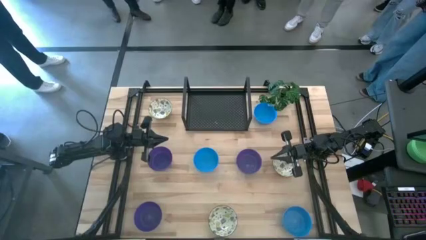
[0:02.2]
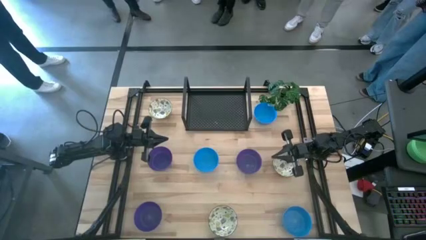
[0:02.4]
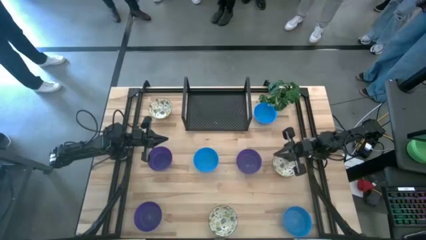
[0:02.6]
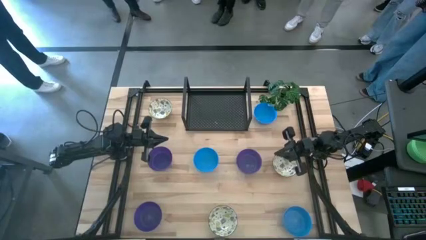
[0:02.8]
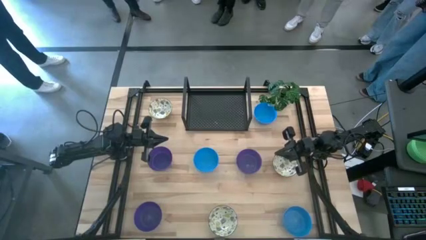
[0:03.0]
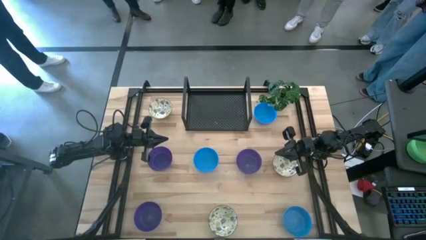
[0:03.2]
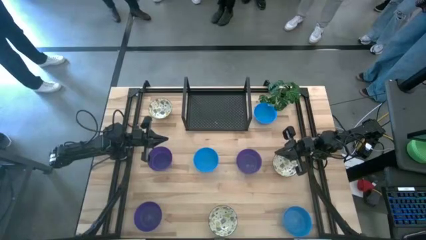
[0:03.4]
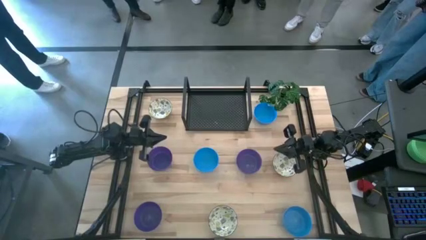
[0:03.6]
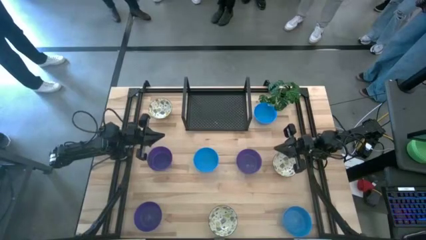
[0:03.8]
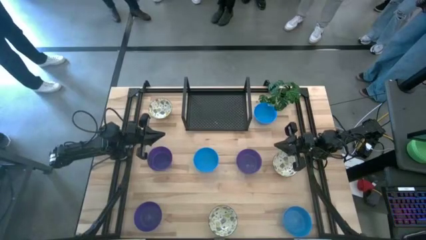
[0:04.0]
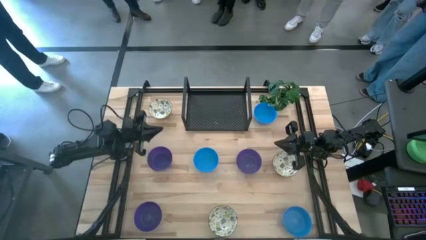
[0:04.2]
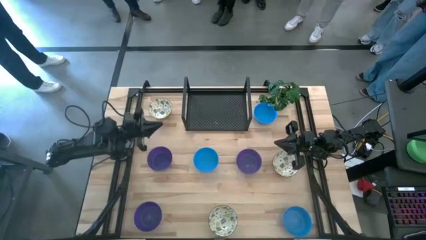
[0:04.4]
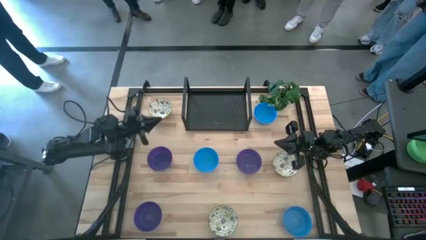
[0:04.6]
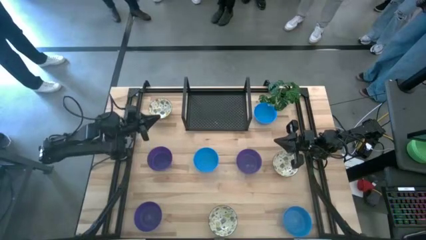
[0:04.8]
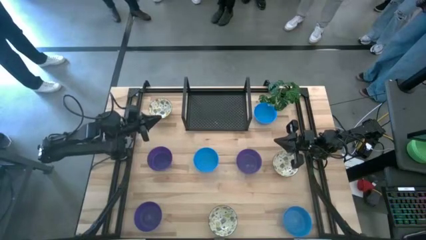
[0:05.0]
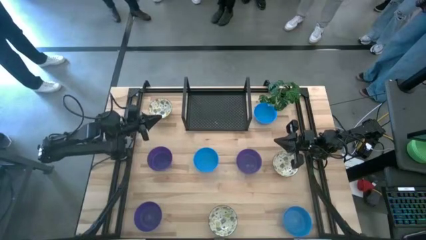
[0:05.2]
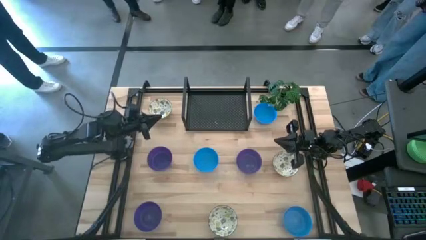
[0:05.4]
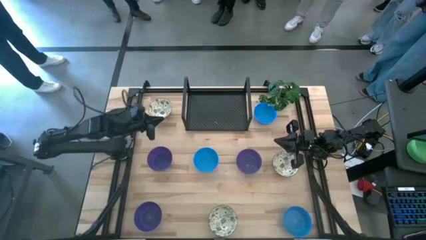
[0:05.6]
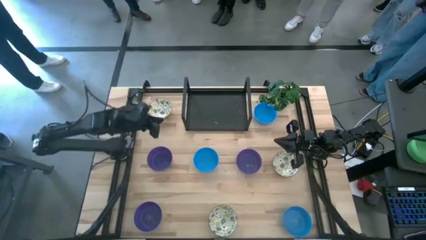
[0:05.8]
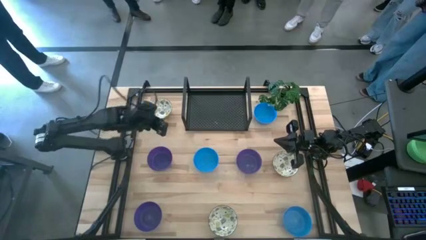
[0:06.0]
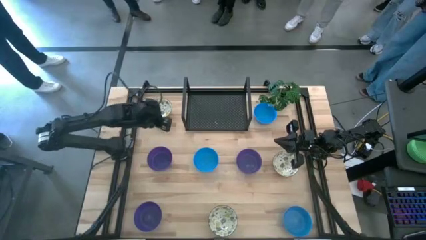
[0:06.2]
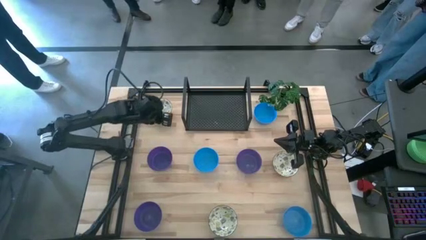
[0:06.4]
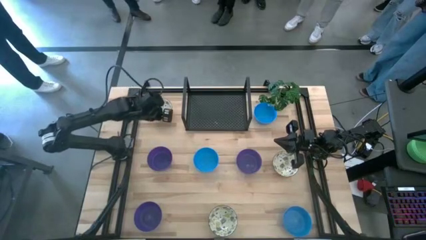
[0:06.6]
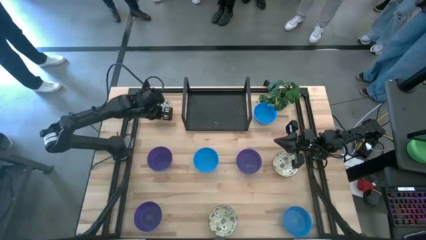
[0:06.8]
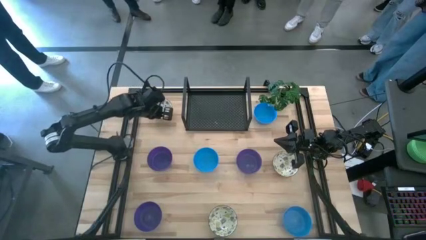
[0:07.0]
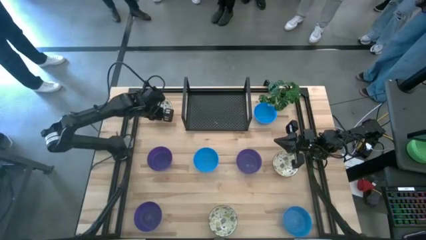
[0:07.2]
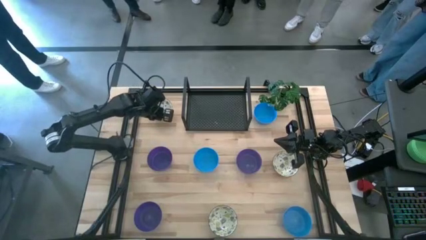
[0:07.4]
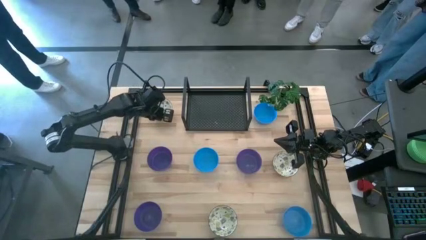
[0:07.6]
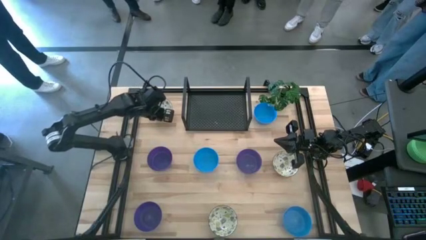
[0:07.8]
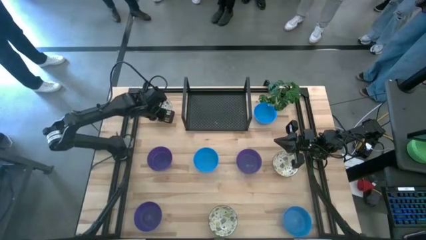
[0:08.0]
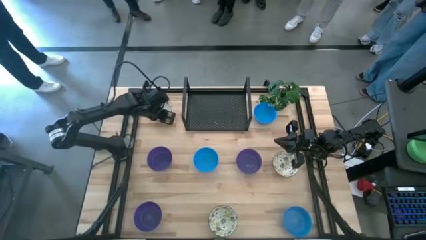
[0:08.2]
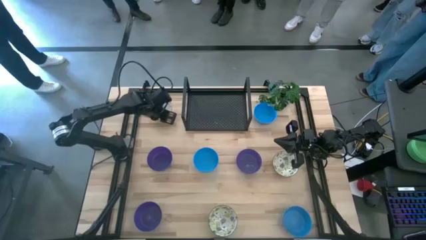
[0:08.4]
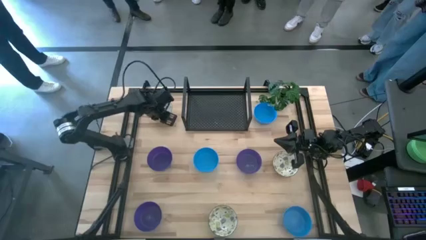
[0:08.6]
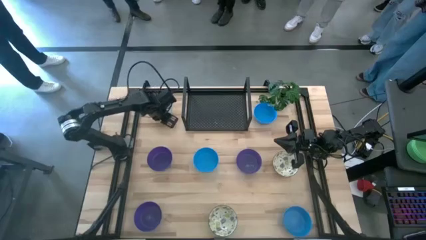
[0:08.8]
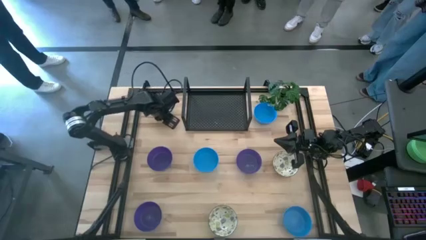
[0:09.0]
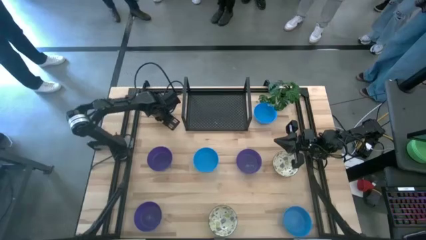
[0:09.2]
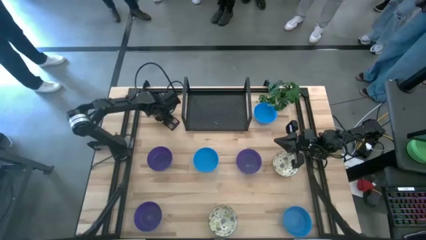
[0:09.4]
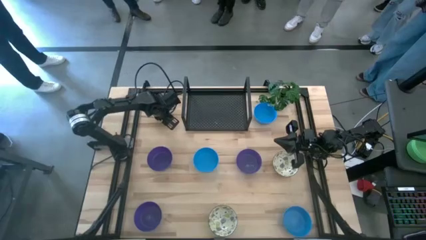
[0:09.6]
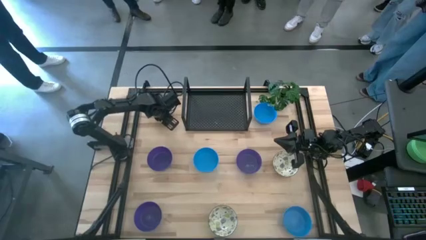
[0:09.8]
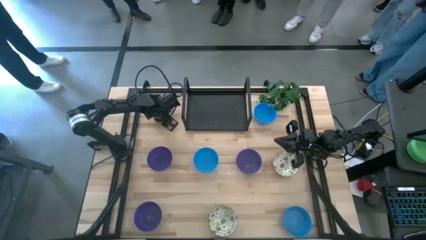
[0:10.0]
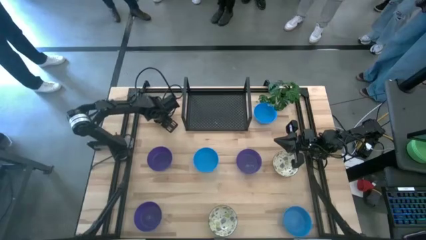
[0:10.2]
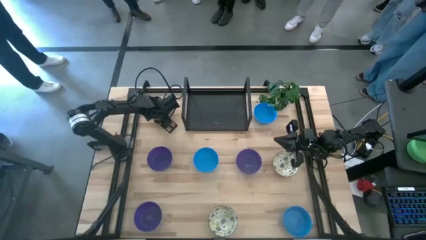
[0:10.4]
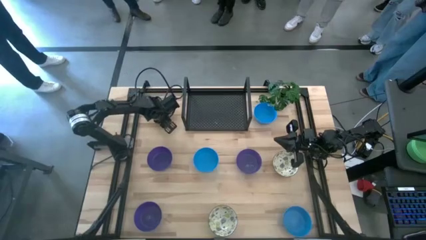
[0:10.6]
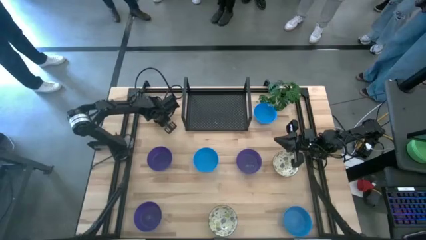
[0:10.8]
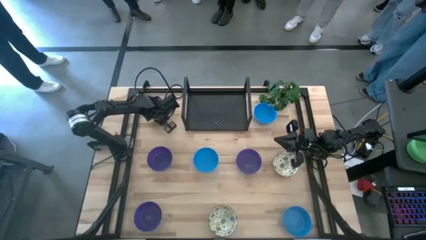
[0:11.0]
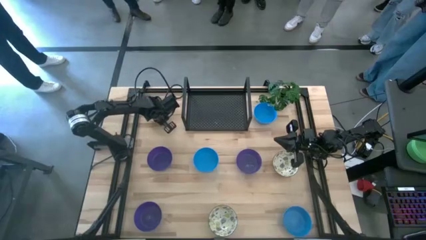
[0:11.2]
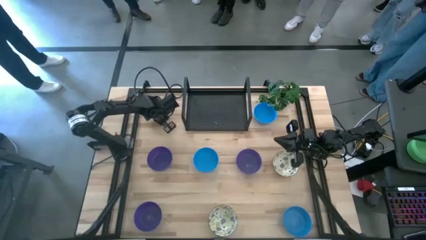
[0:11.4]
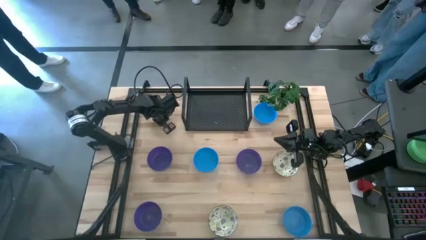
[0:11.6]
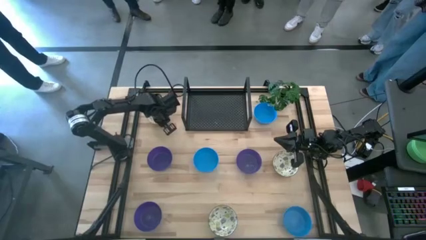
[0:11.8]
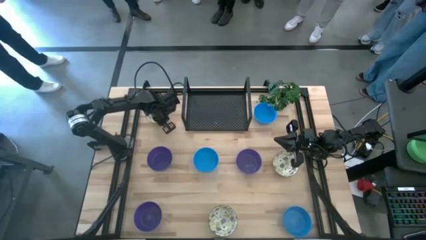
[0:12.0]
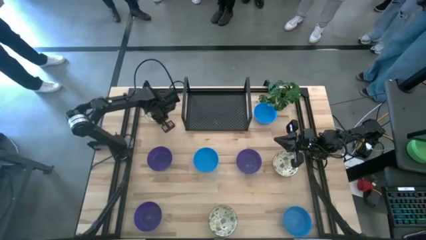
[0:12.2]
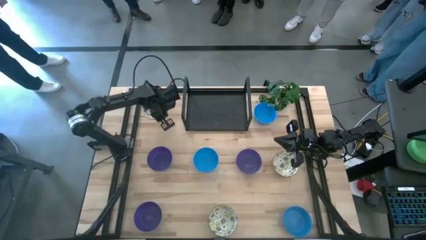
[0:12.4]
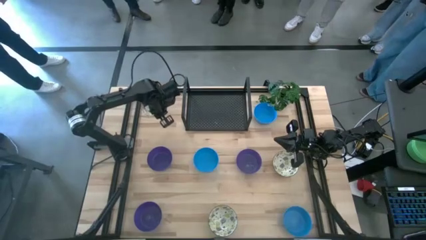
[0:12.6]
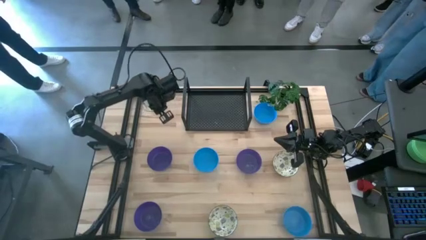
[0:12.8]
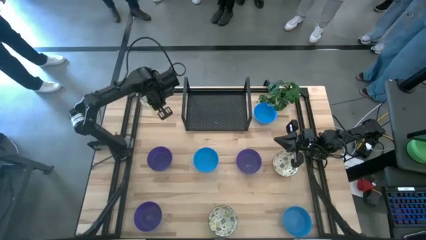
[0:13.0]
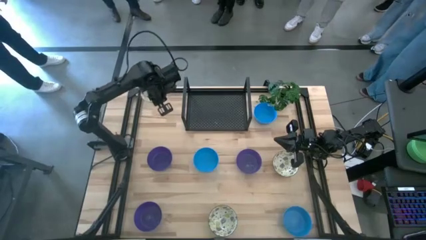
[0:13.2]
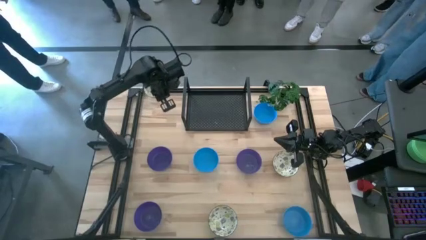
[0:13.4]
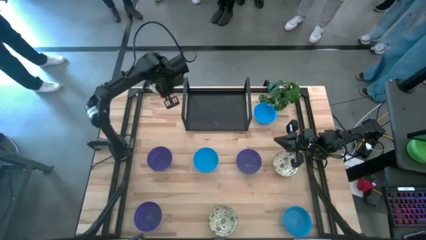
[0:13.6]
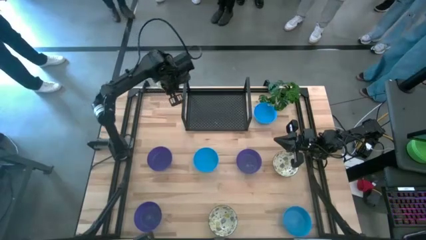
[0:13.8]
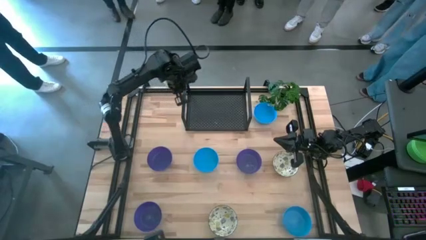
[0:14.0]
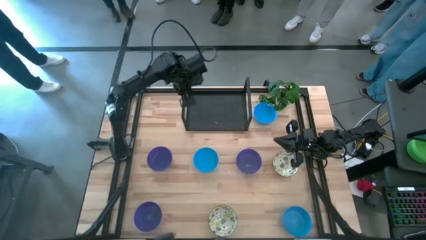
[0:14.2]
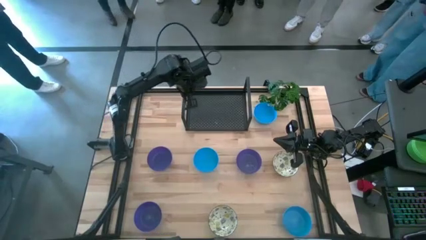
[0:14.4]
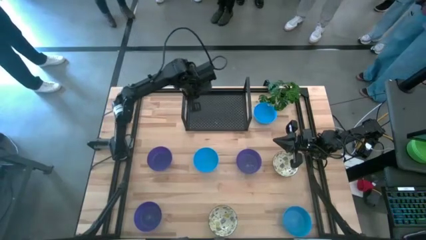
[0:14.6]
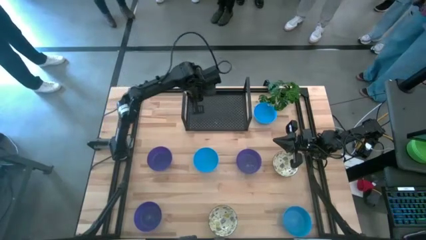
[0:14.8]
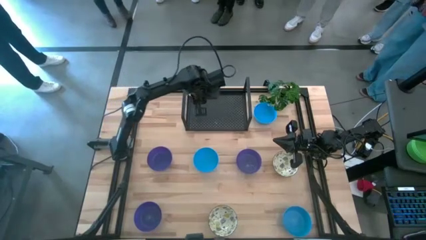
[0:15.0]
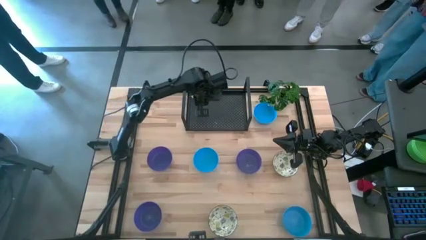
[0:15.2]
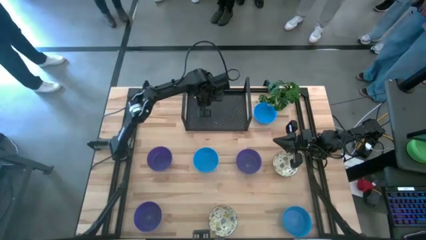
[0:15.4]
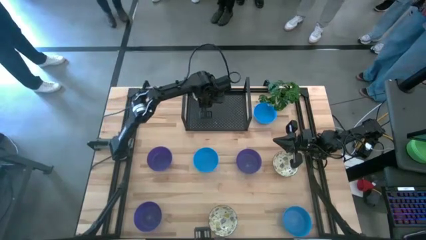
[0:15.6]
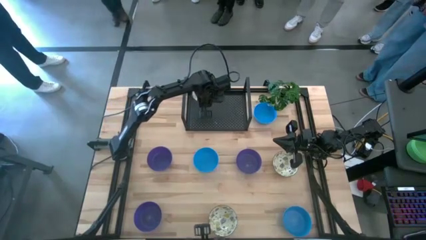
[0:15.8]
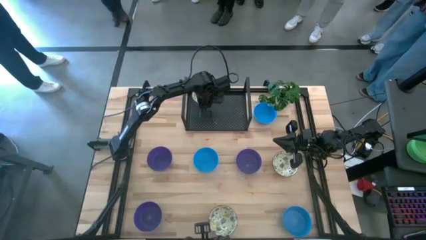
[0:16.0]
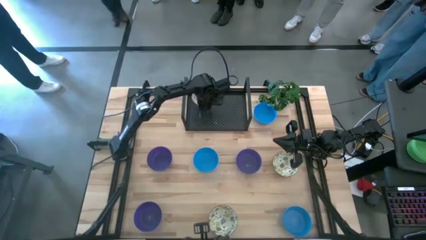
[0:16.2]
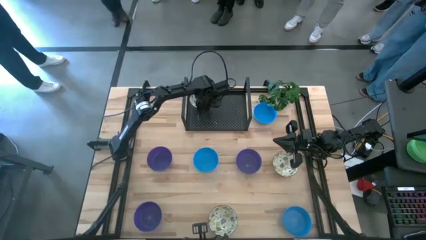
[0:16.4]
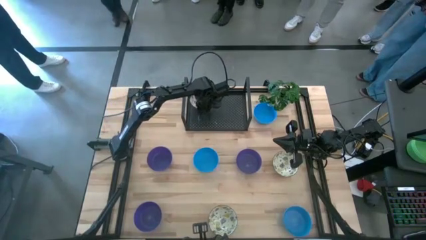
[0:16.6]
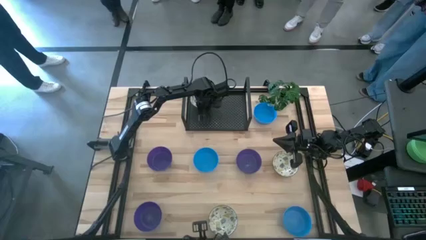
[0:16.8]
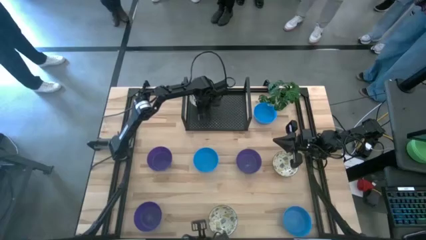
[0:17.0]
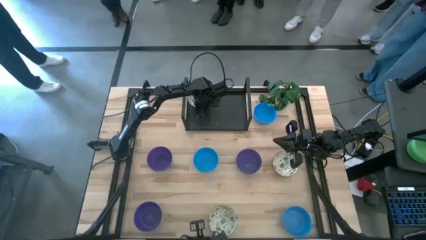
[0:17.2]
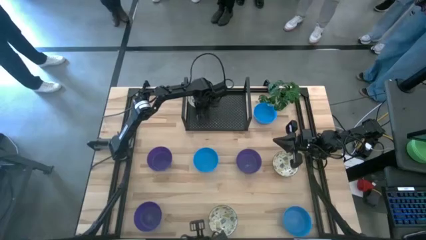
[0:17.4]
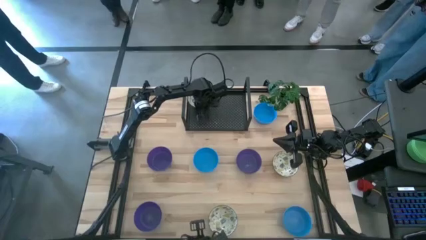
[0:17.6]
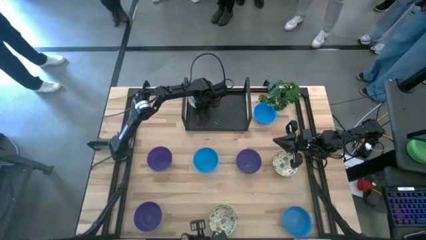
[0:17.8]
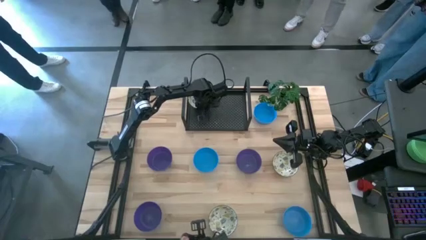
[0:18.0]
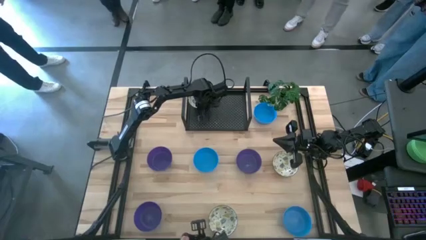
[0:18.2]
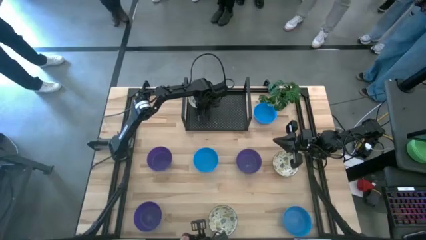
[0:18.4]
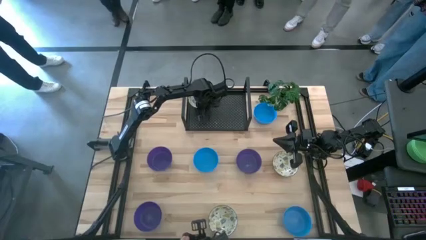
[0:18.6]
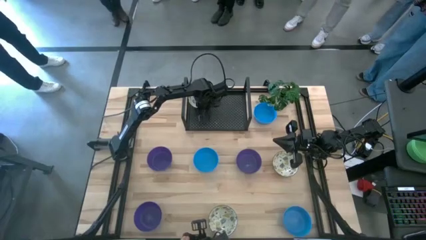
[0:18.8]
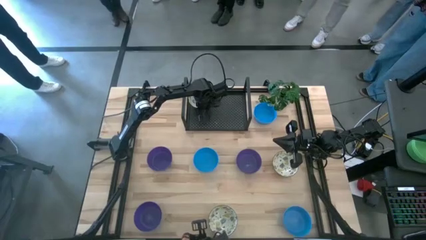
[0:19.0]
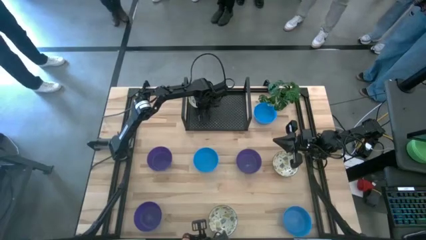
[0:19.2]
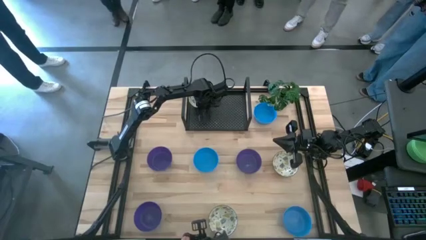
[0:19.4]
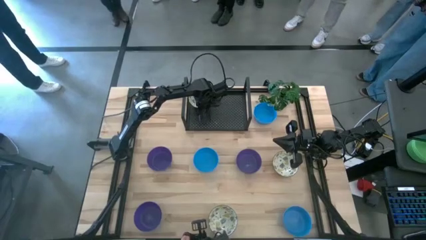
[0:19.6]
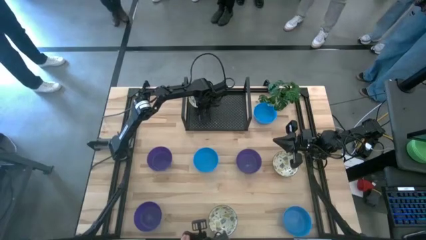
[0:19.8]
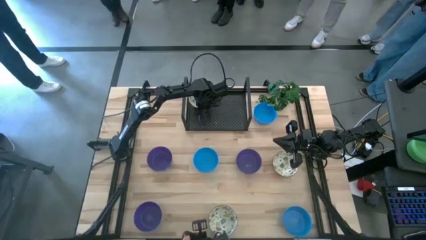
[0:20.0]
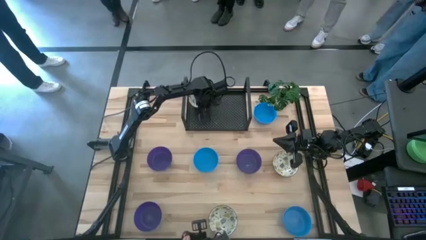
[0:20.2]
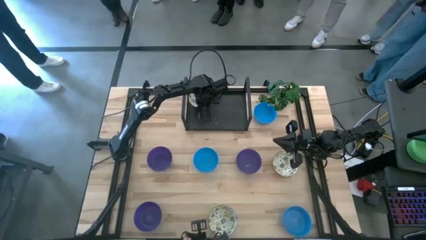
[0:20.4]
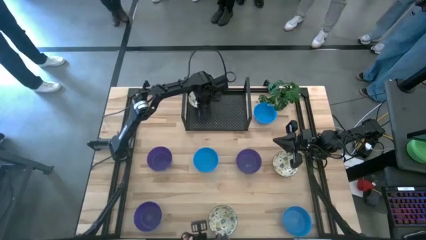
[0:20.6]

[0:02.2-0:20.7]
Task: Pick & Place Mini bowls
Put the top white bowl on the shelf
